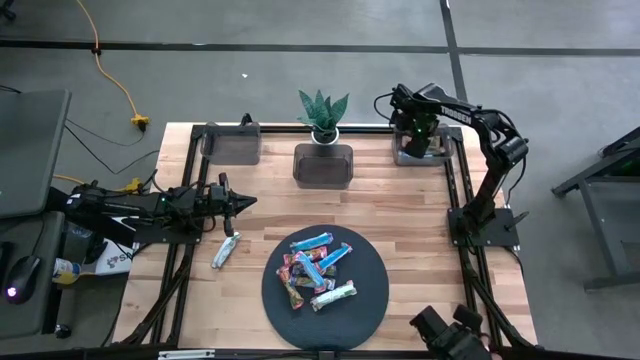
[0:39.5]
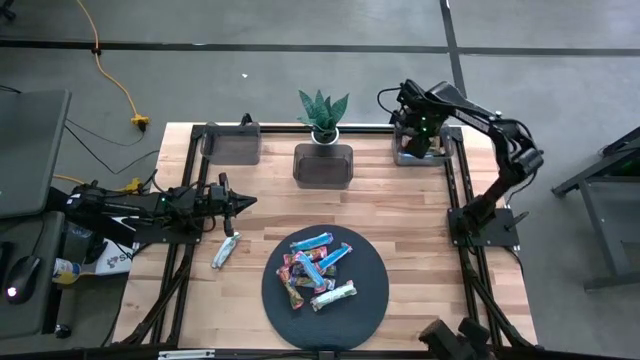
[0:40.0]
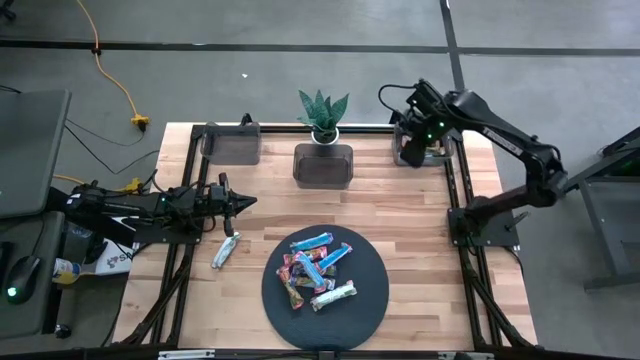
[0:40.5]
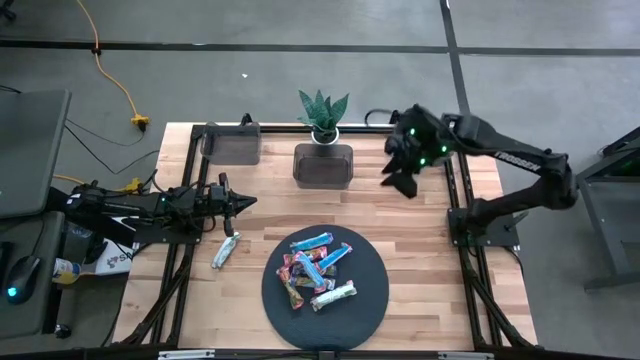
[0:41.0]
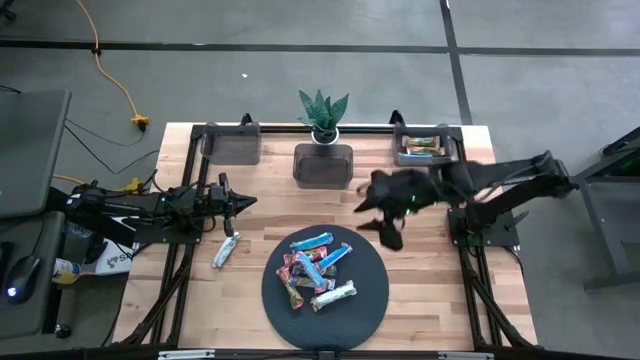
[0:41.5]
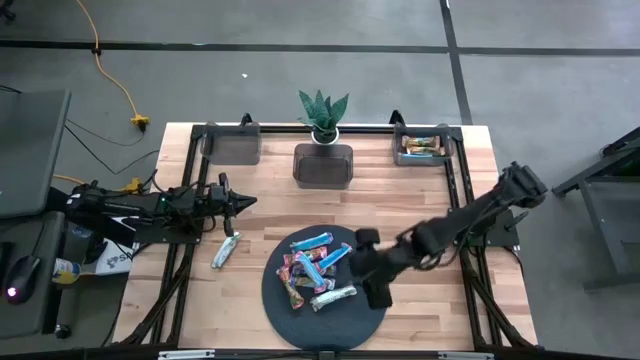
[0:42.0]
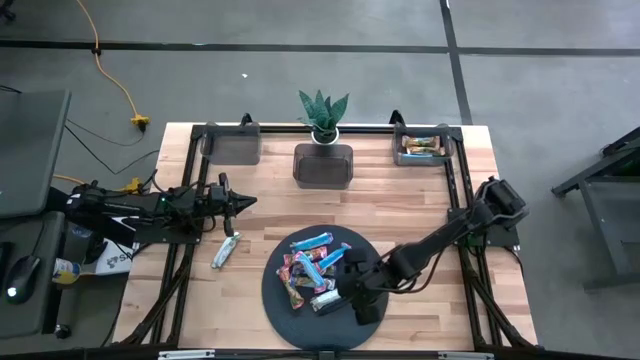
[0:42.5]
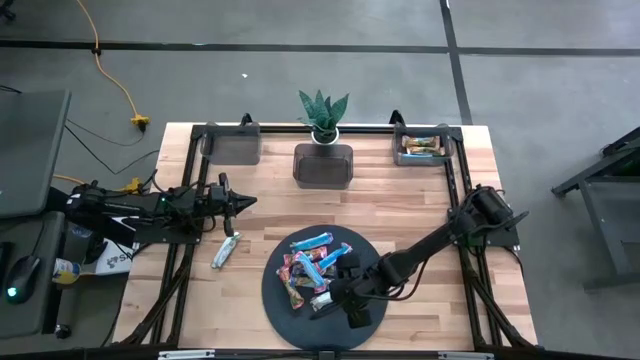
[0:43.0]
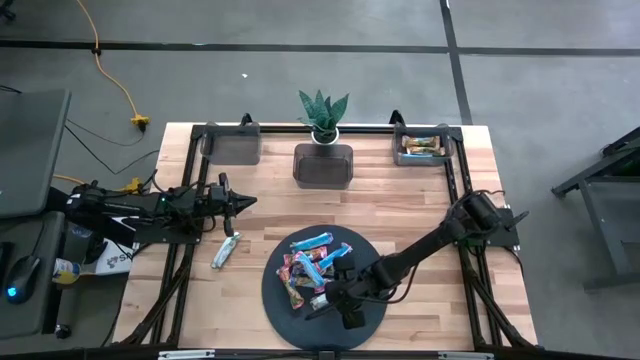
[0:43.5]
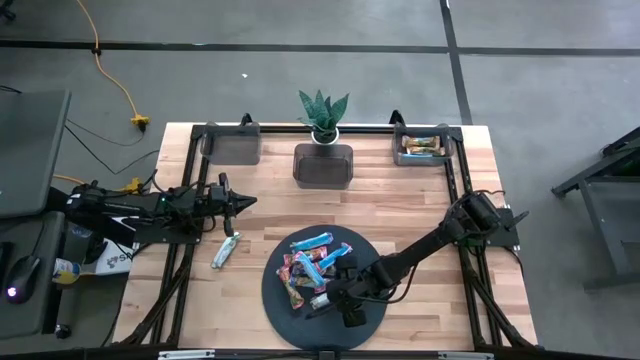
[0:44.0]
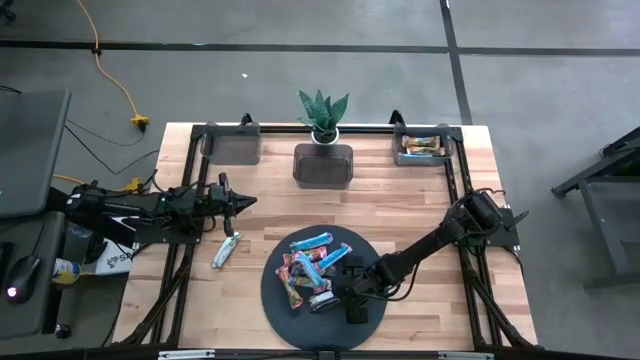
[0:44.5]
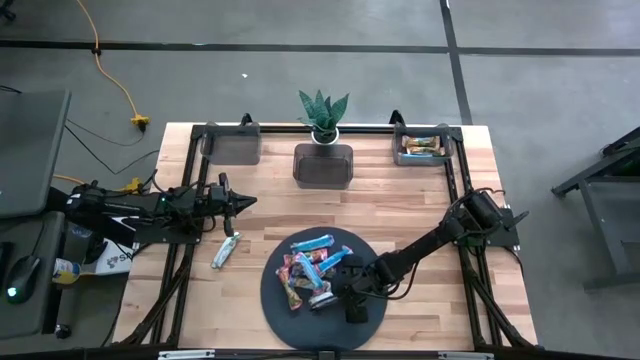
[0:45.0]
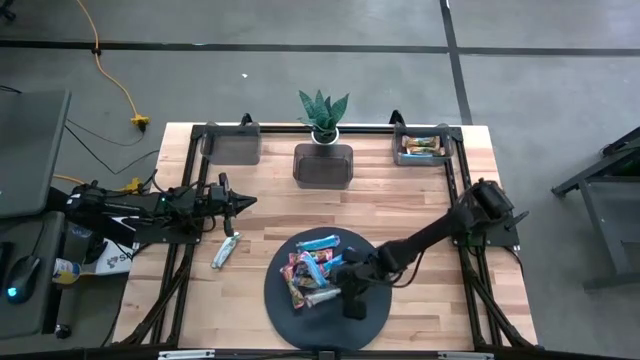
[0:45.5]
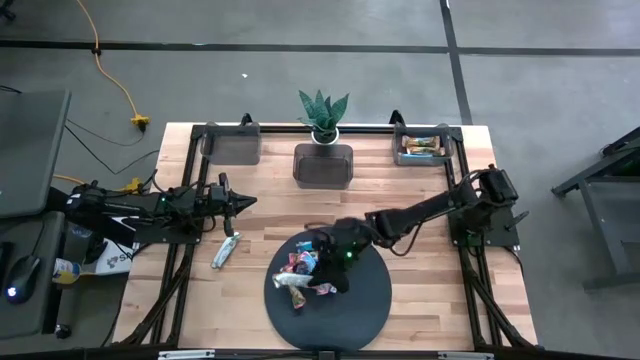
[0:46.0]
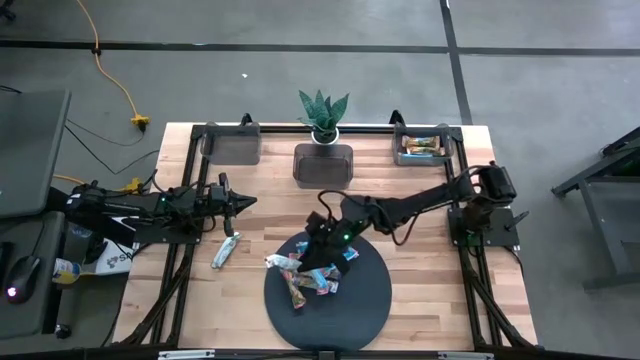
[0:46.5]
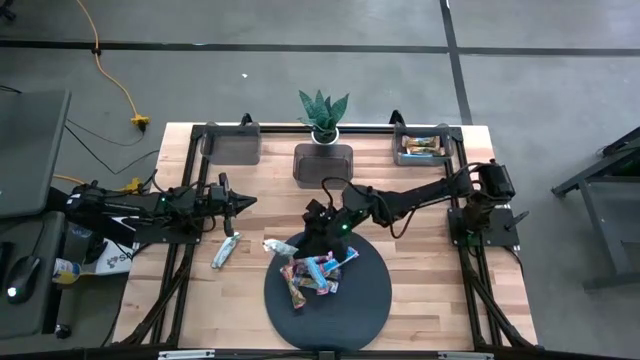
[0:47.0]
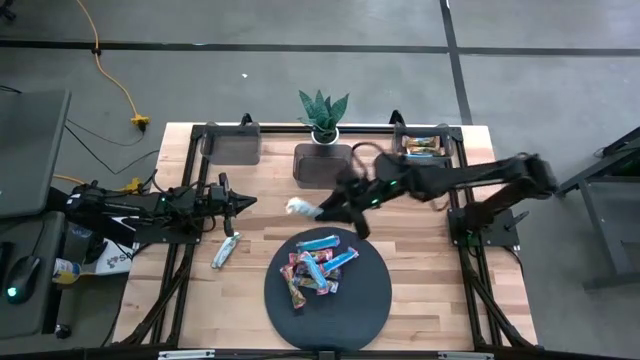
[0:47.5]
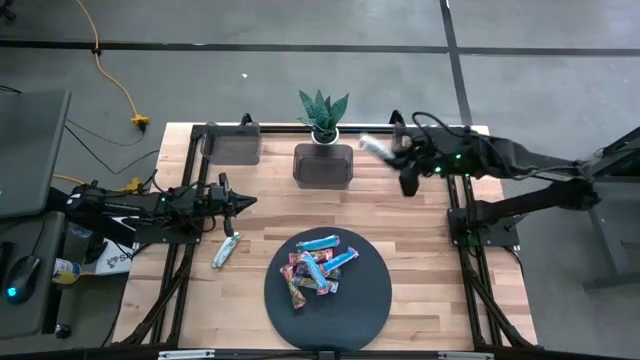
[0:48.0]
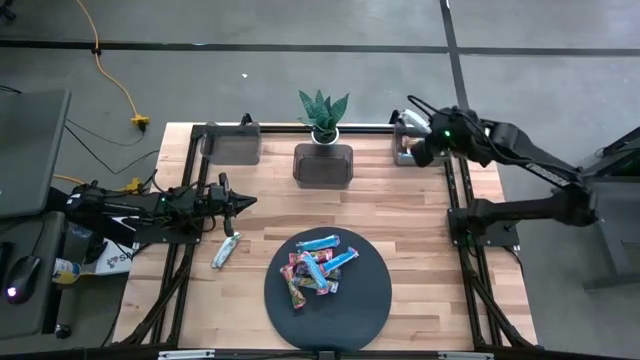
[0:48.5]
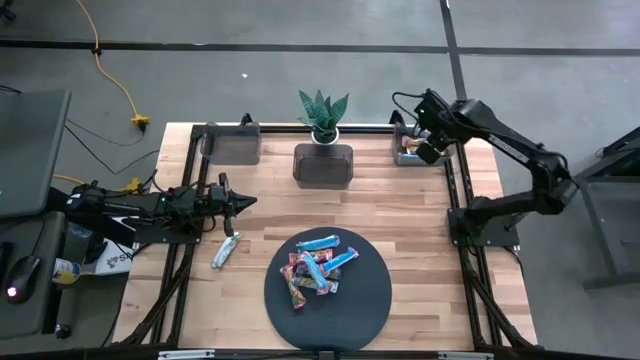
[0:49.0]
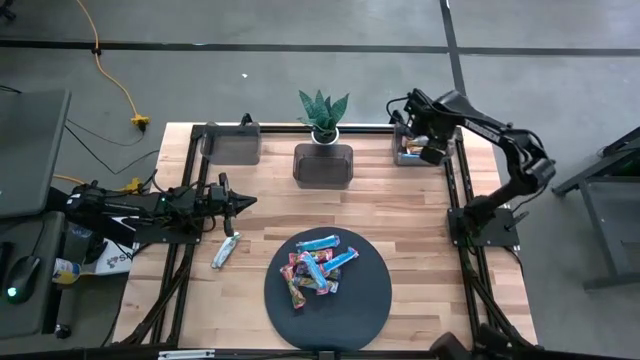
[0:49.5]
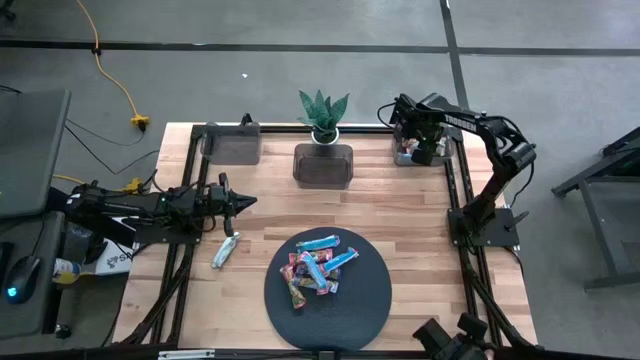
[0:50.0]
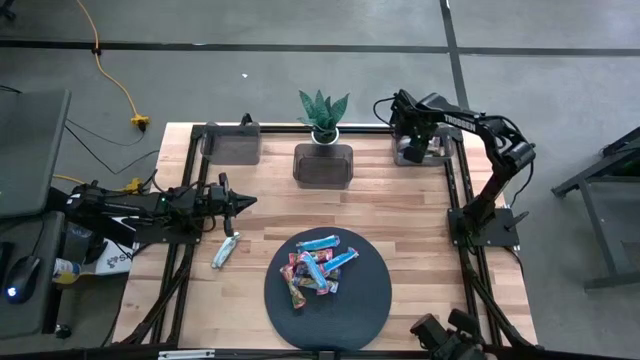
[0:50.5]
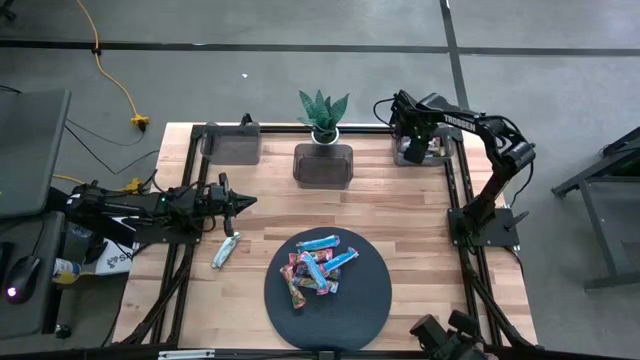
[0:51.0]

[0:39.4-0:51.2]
Task: Pick and place Granola Bars by type
Put the yellow granola bar into the right black bin

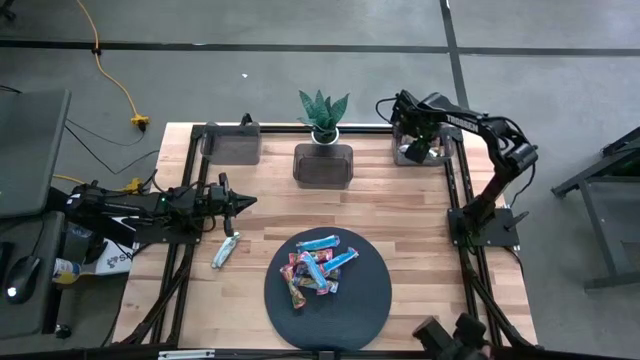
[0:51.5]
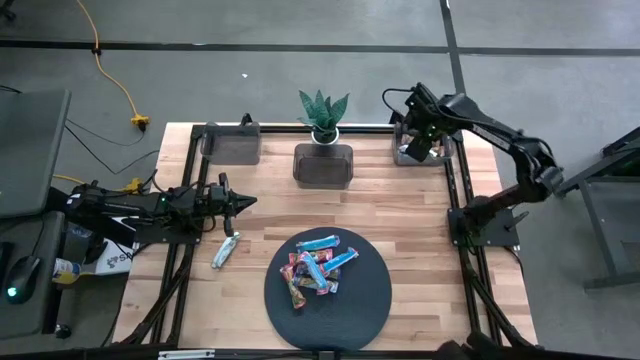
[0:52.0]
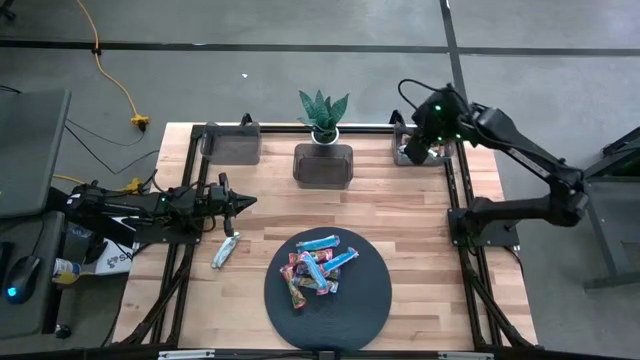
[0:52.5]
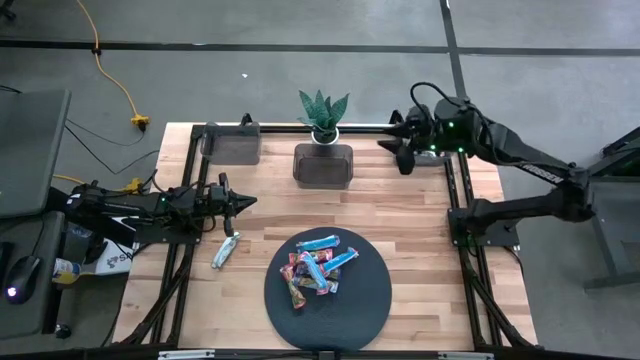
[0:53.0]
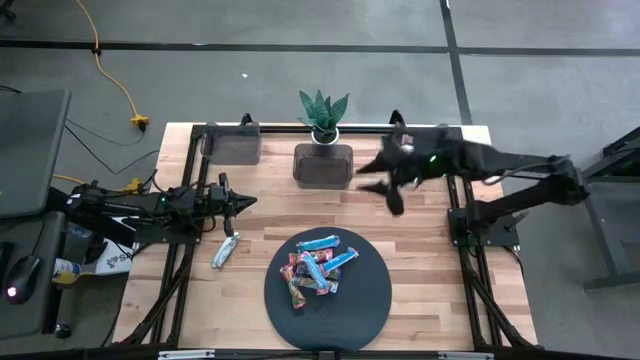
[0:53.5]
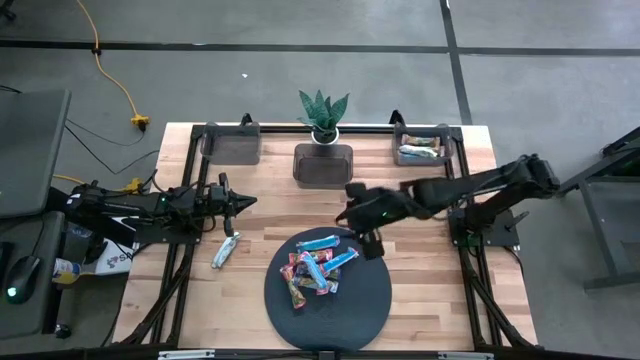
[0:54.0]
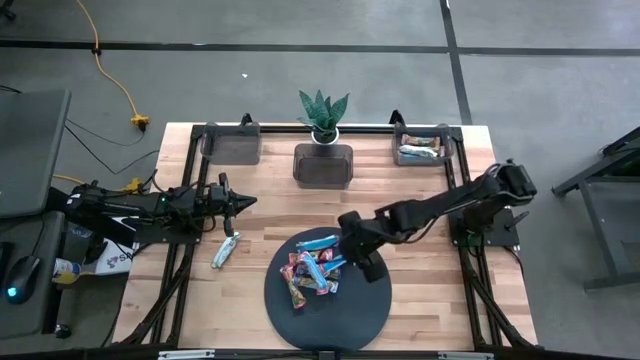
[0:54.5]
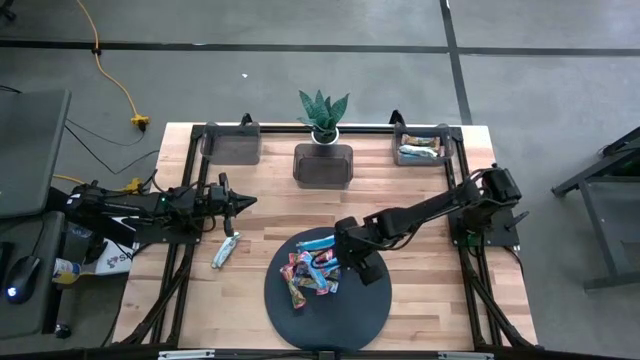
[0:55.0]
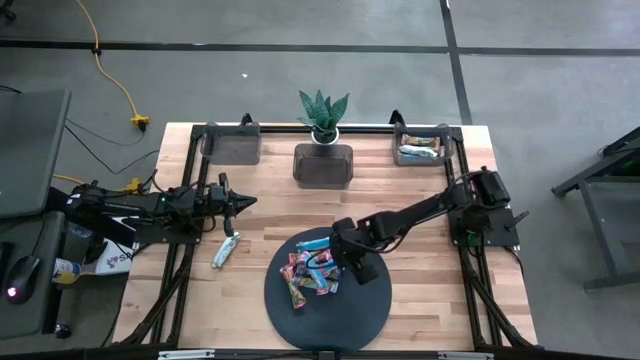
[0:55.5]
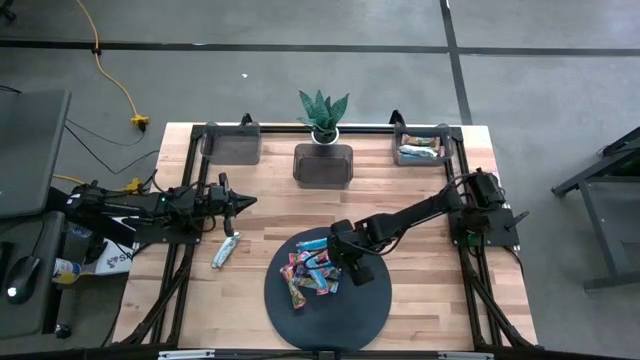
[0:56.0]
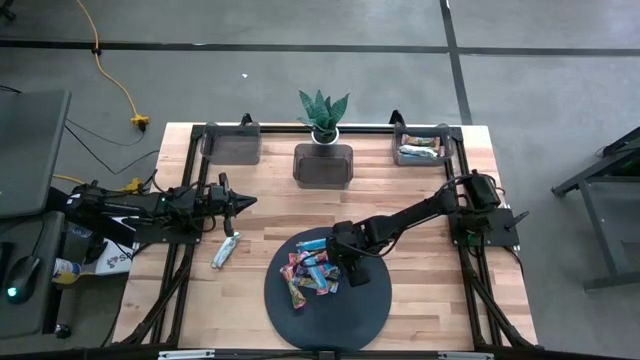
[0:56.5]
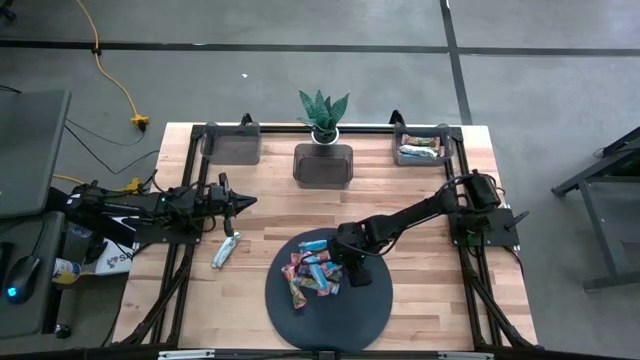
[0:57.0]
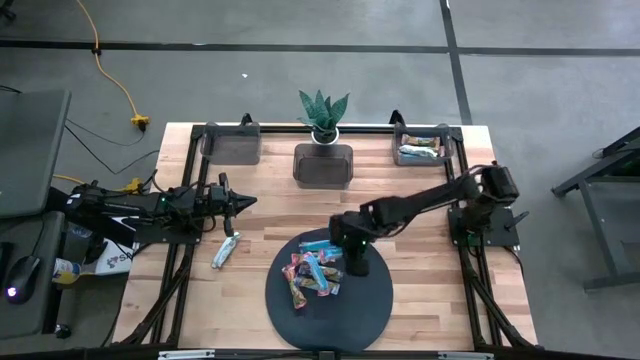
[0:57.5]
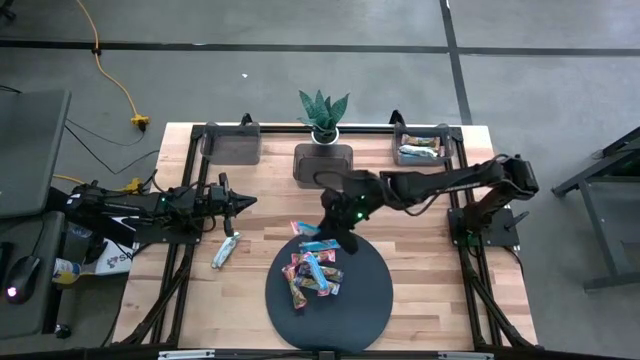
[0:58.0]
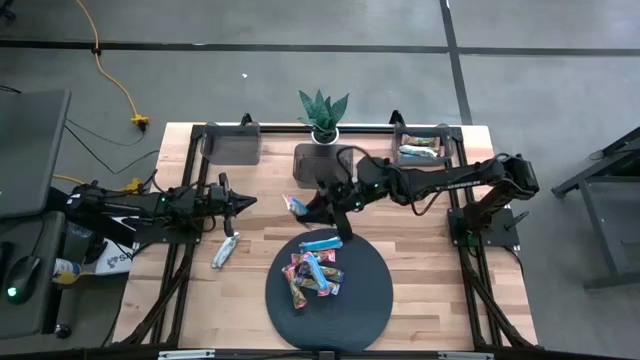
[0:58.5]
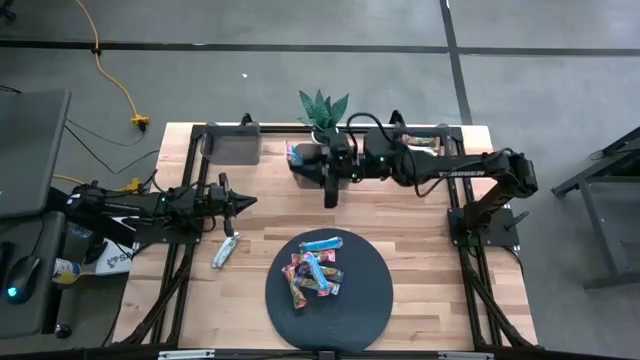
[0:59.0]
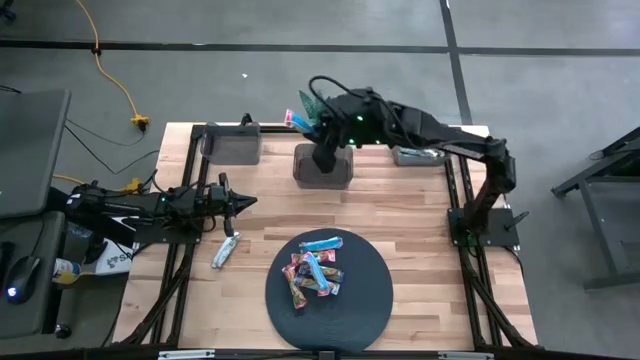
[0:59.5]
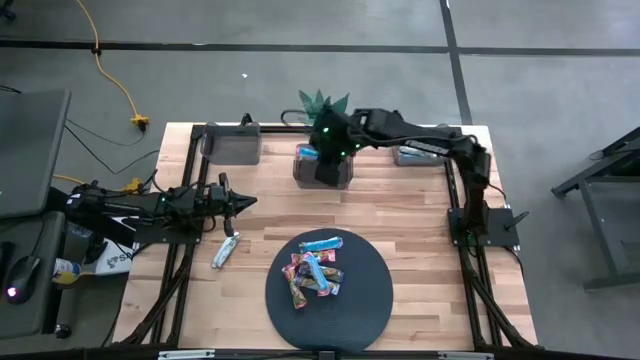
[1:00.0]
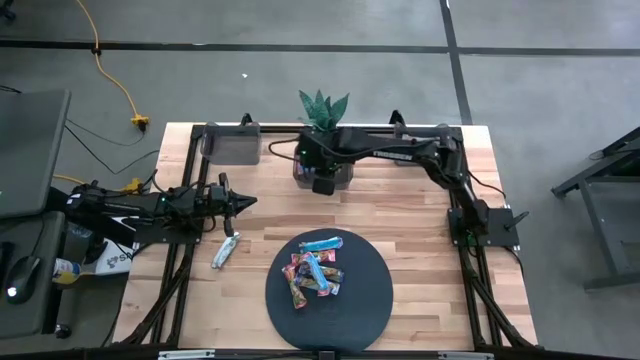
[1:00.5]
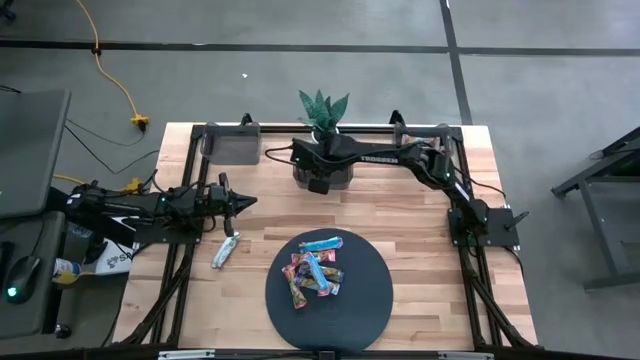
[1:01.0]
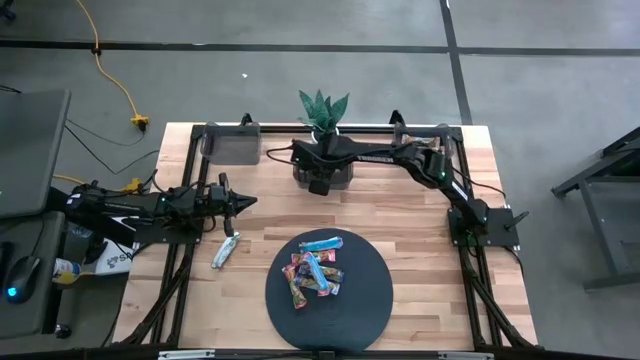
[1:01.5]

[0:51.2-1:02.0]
Put the red granola bar into the middle black bin
